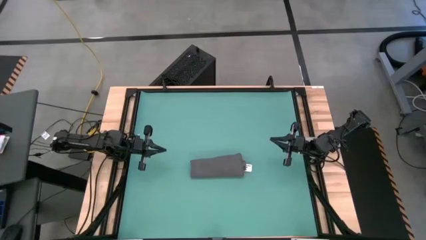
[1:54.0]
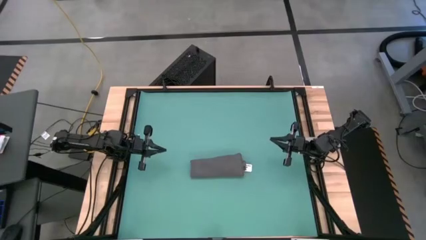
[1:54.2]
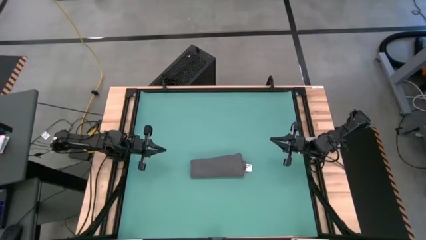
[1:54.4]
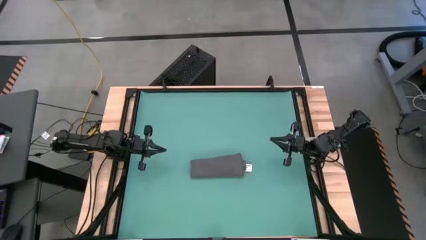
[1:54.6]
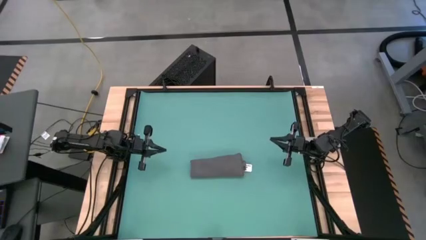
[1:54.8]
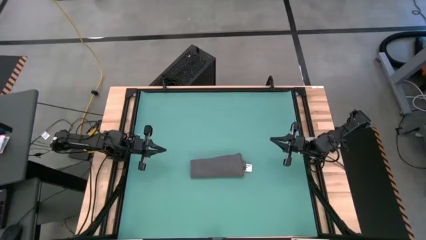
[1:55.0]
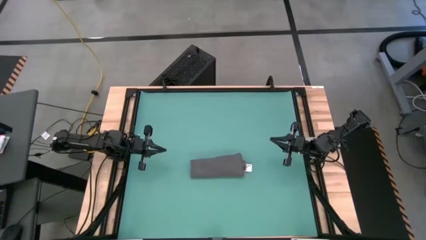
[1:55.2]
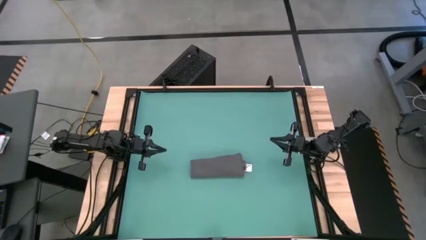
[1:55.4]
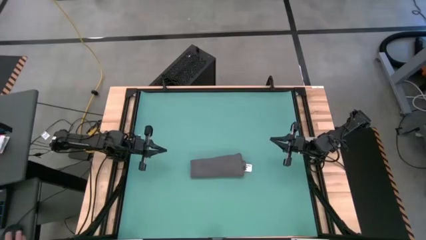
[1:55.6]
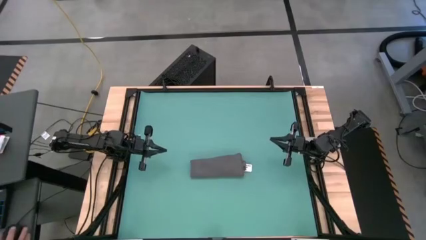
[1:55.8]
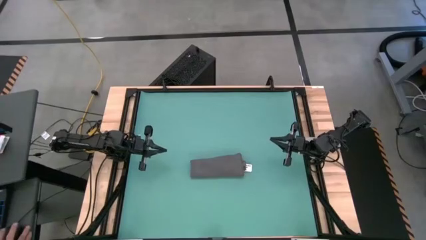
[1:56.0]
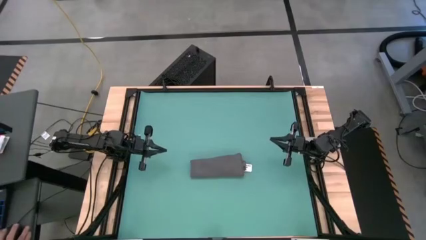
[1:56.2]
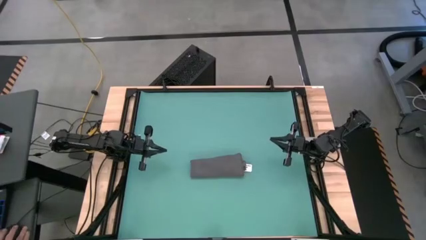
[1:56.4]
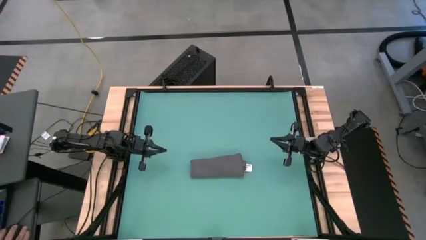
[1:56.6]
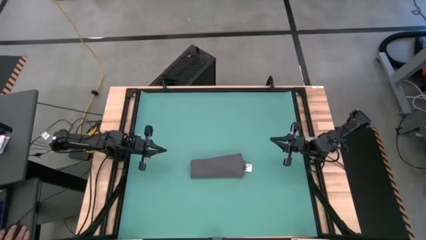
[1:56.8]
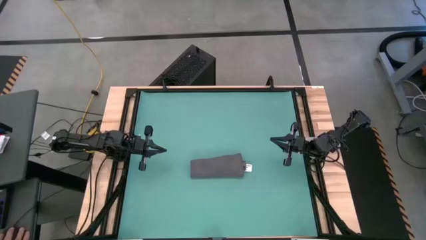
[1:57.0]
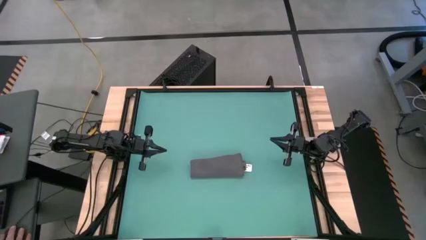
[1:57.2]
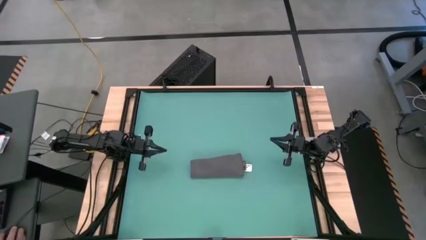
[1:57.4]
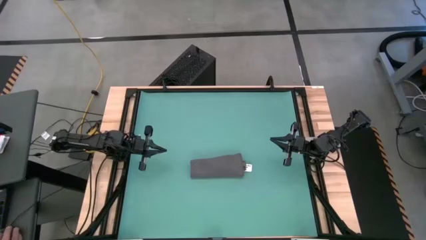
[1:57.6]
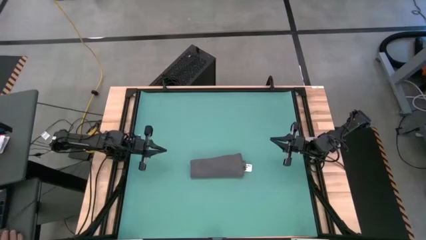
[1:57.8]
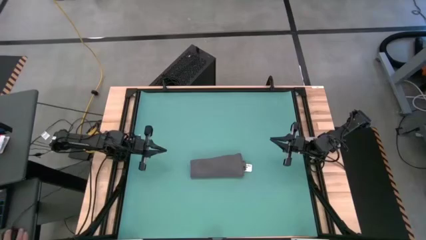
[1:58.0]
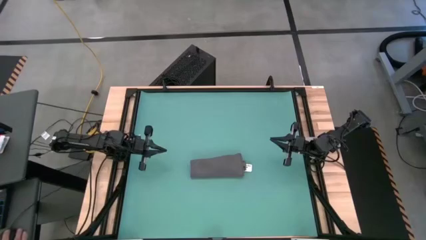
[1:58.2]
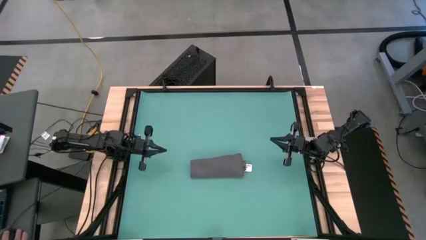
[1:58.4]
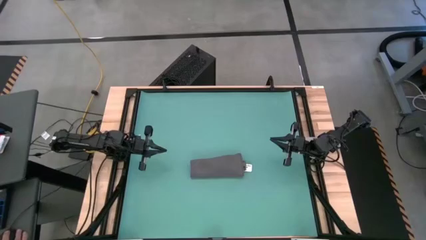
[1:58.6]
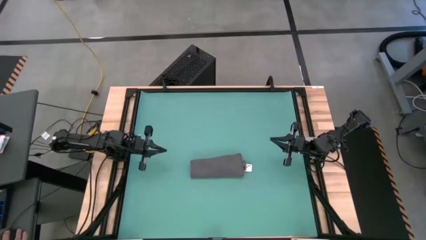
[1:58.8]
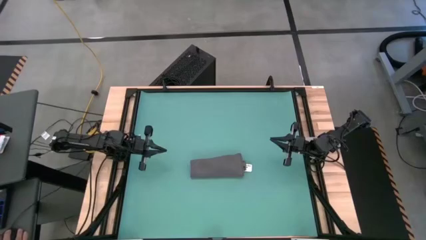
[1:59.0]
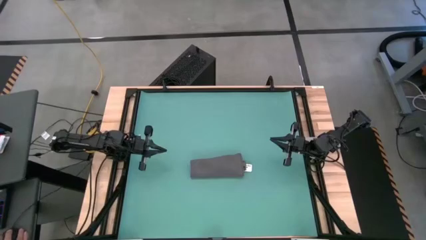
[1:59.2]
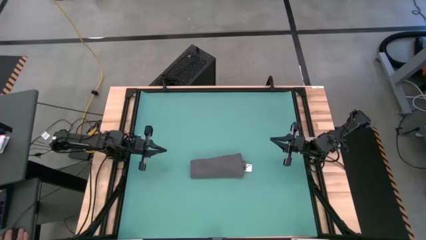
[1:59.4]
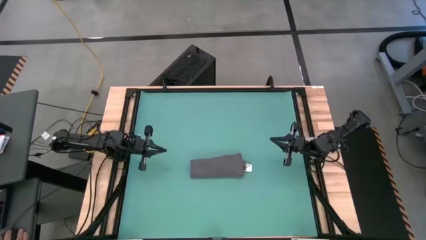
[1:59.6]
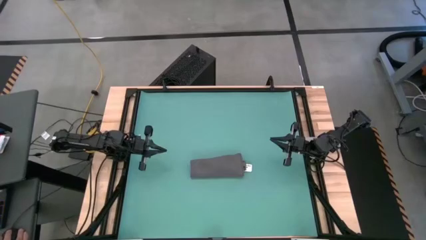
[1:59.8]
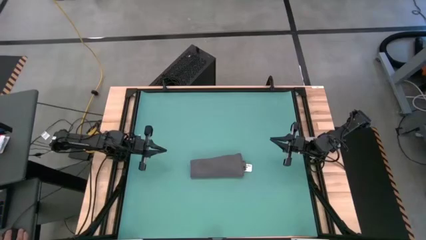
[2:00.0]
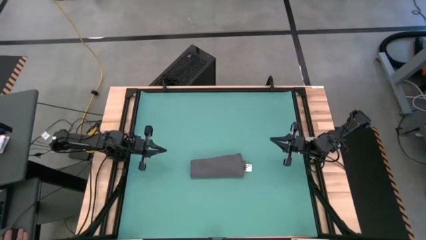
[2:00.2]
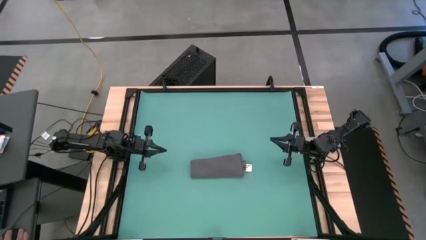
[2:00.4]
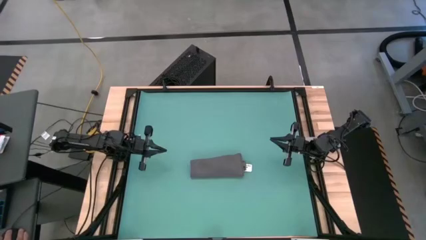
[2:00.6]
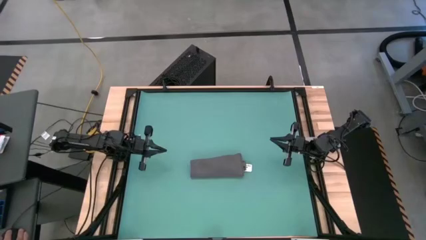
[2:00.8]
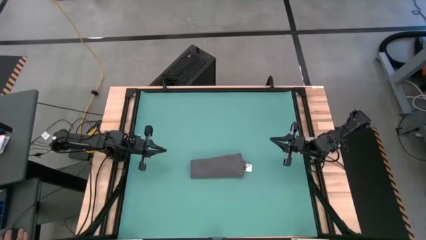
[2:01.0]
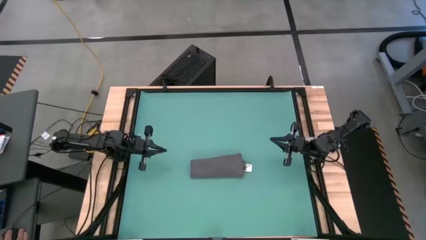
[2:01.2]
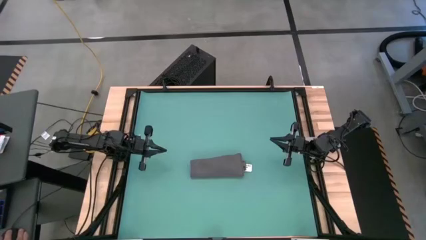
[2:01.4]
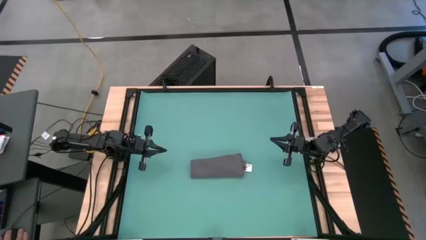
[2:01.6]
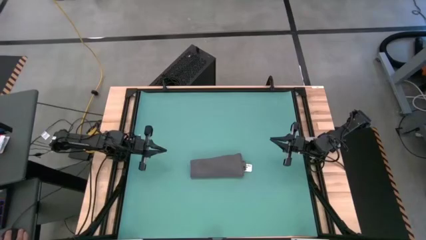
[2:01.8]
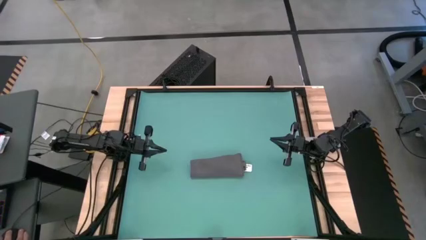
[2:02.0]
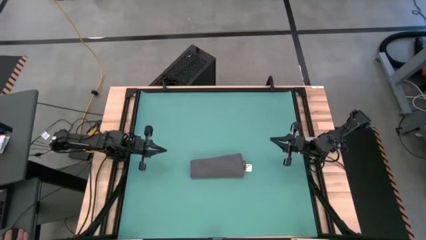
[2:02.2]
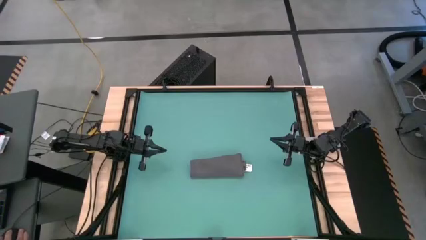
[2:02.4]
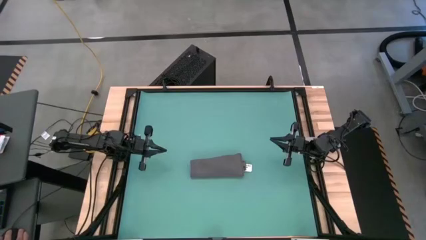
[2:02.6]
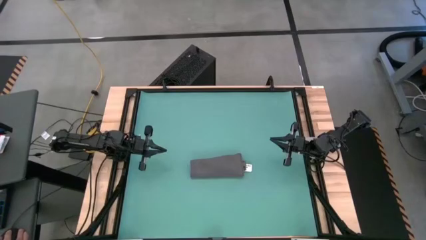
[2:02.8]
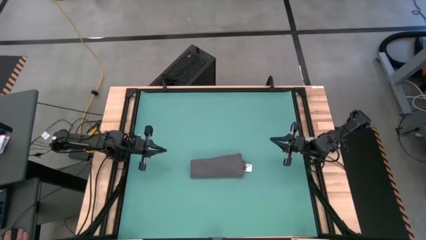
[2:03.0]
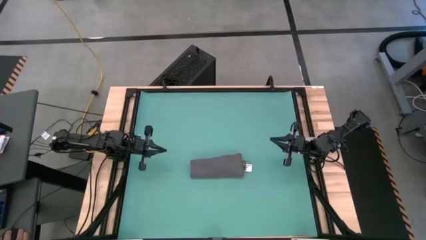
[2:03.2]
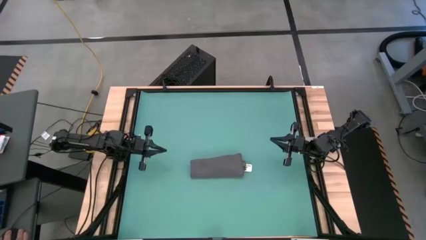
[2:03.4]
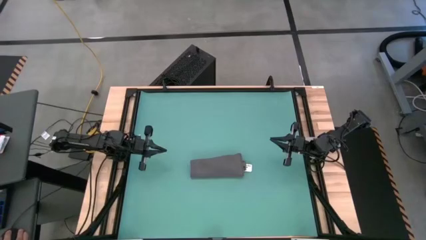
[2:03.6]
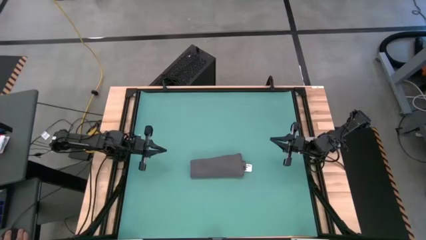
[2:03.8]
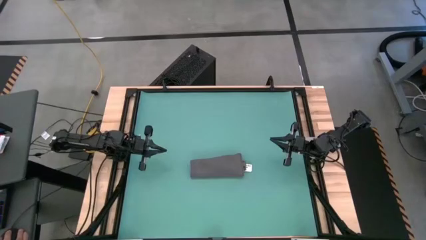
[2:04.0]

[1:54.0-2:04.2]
Task: Roll towel into tight, uniform cylinder
Return to Home Position

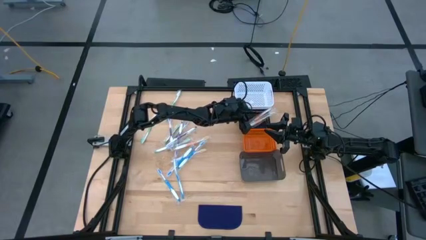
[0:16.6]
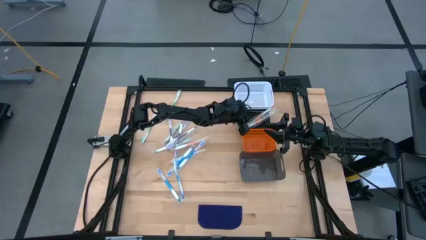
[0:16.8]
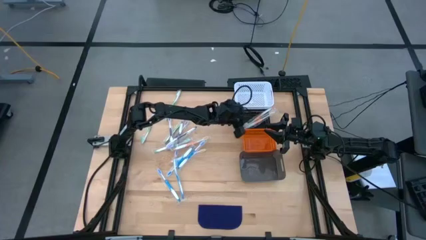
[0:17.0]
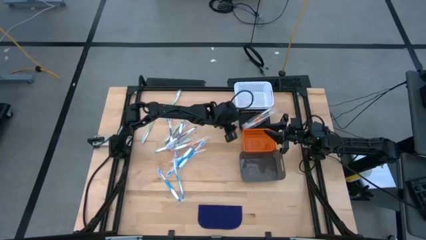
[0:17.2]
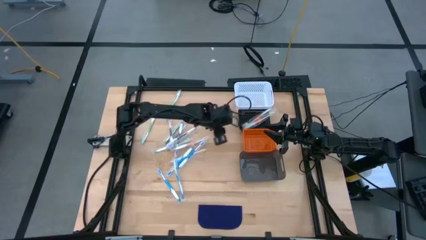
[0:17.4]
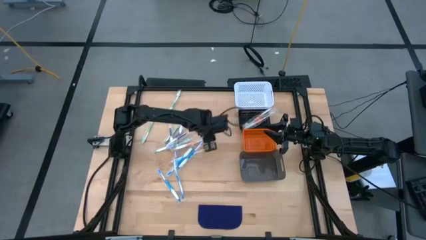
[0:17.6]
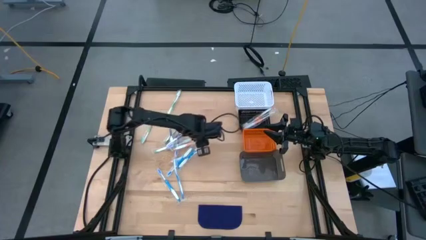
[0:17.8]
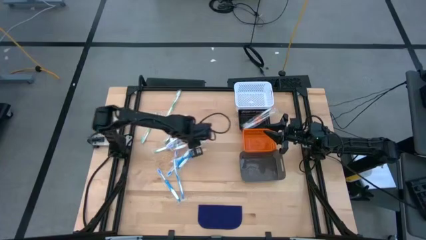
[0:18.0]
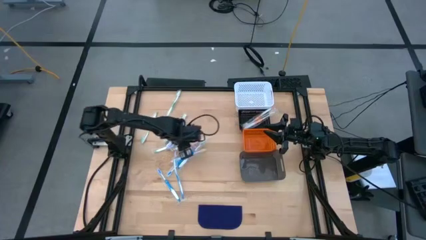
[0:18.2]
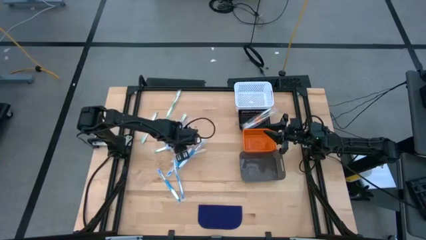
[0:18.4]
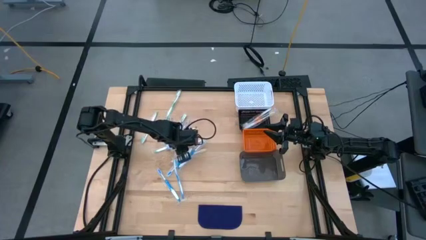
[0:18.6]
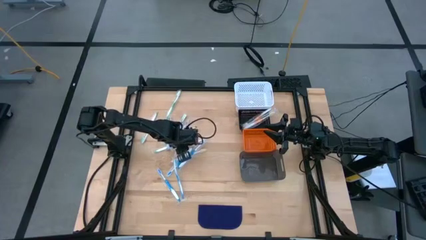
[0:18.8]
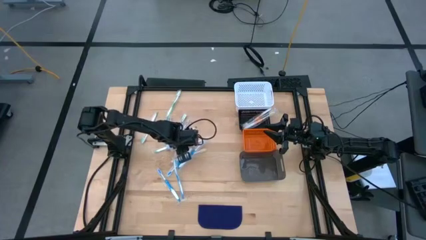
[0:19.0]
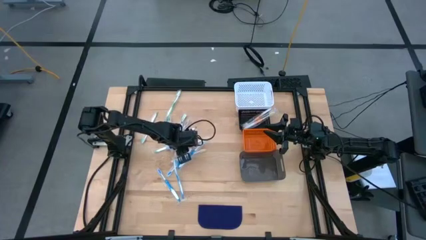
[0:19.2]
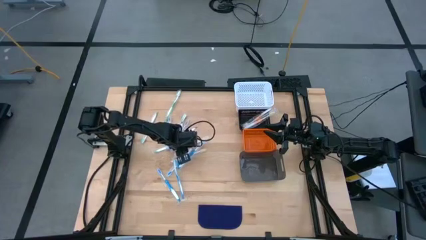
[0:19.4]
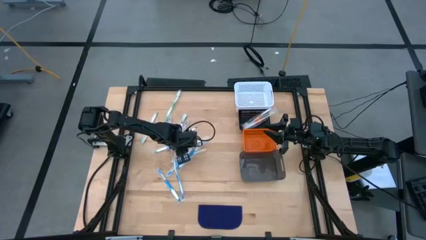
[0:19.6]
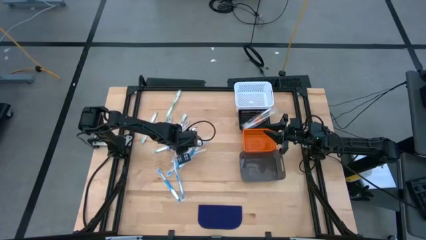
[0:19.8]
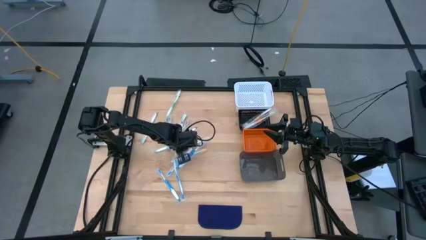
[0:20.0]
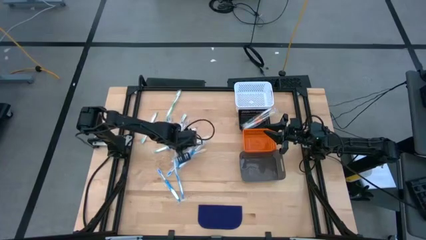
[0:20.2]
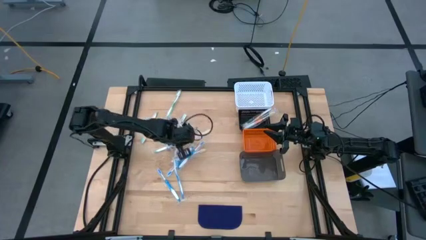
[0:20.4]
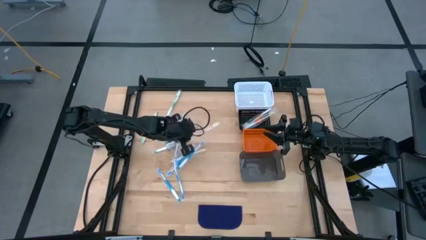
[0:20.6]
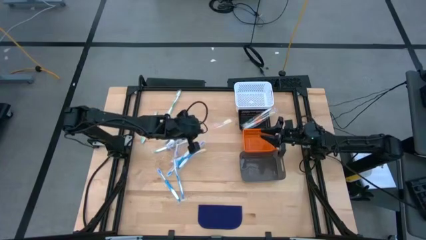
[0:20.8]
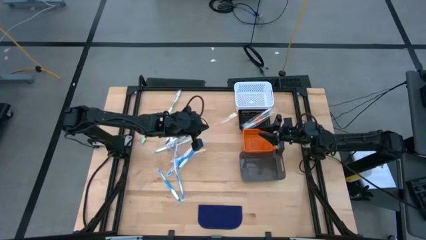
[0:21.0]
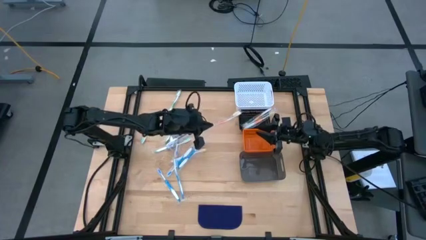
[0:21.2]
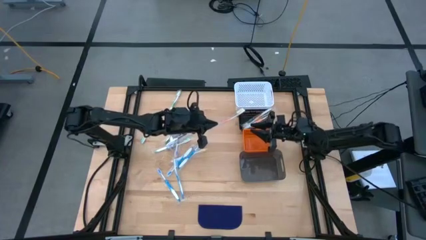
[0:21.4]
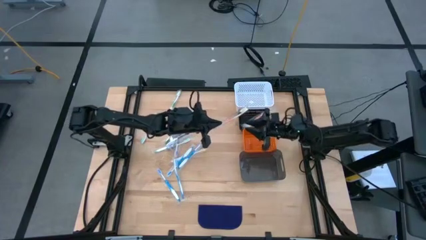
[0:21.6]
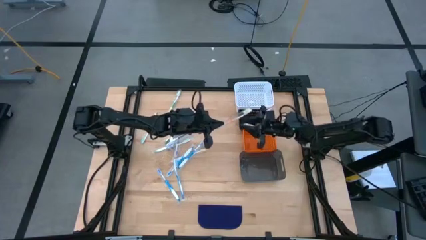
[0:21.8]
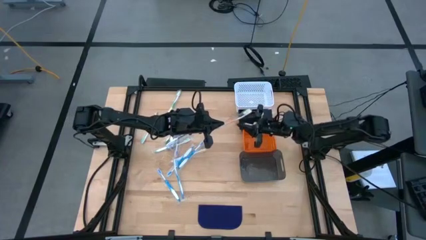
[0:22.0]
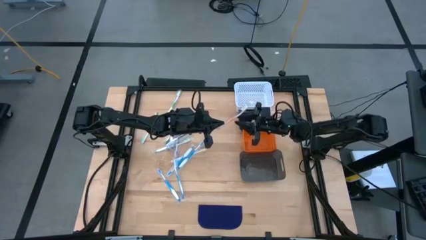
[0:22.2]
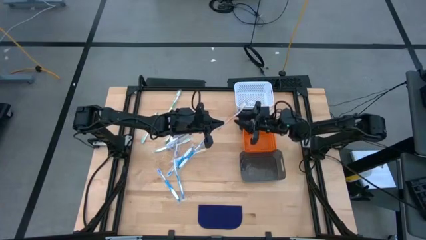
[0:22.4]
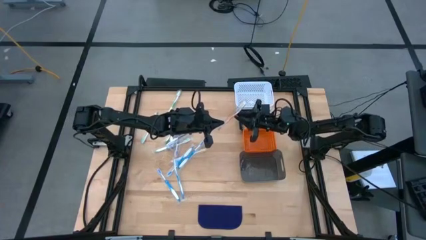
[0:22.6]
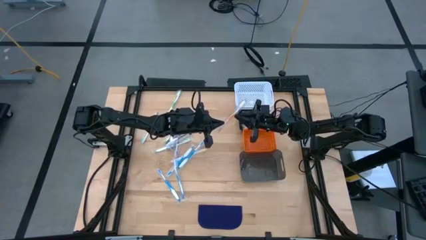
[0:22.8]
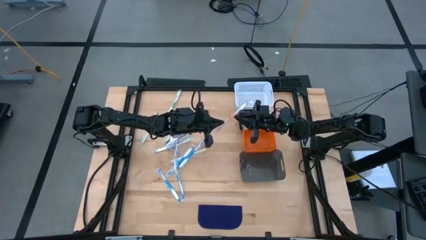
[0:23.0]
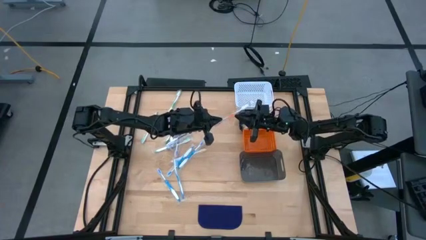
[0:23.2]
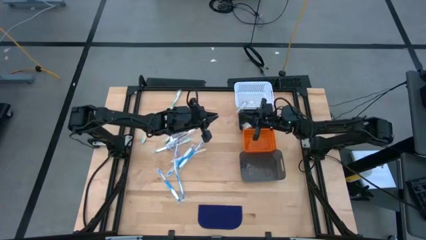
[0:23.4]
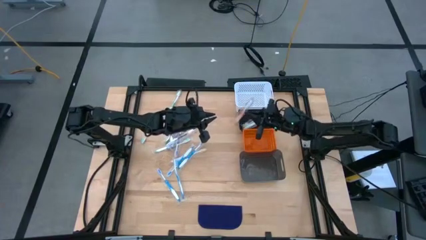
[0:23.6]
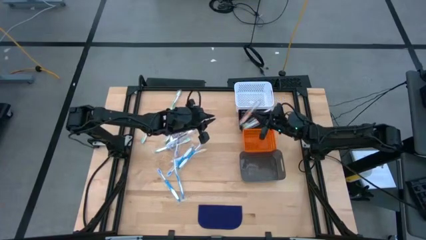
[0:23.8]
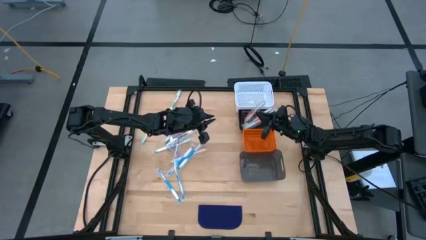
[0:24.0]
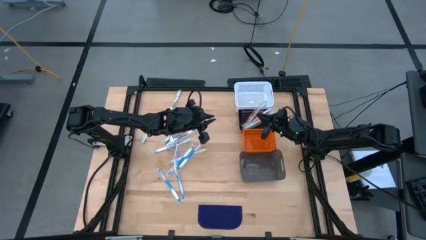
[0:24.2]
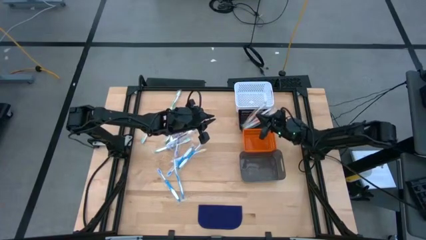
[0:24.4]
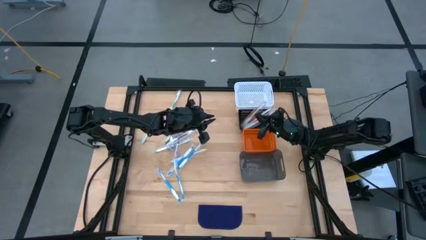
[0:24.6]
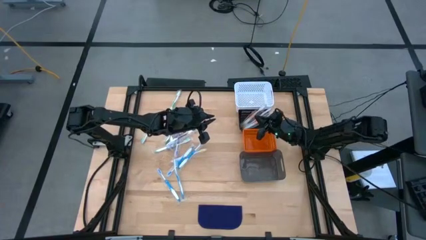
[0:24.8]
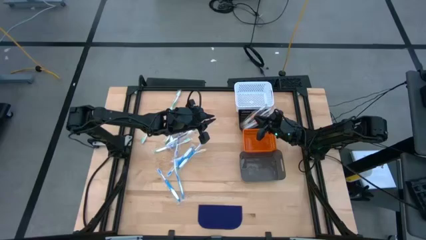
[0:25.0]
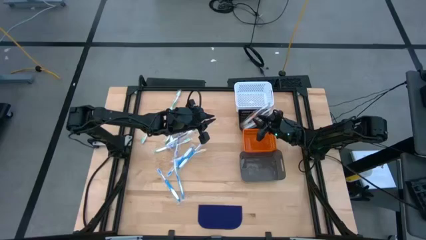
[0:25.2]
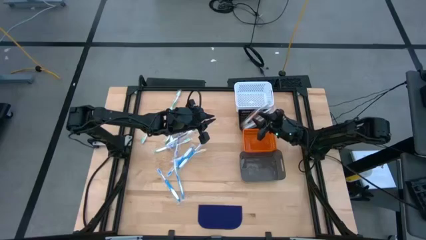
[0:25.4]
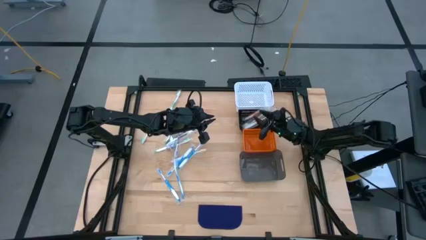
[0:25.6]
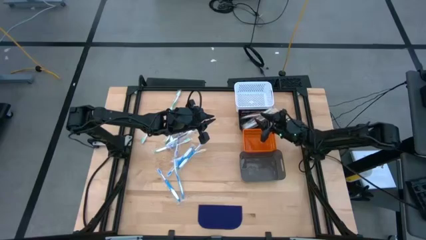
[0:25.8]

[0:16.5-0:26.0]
Task: Pick & Place Toothbrushes
Put the orange toothbrush into the black bin
